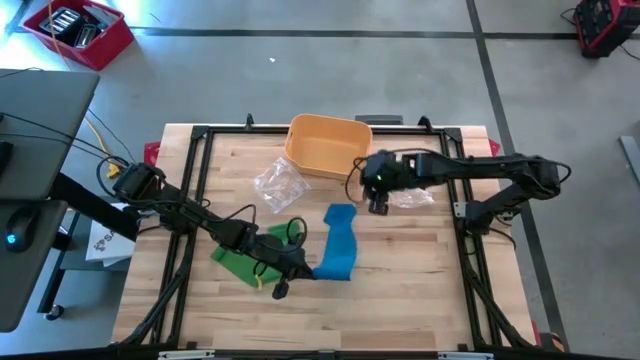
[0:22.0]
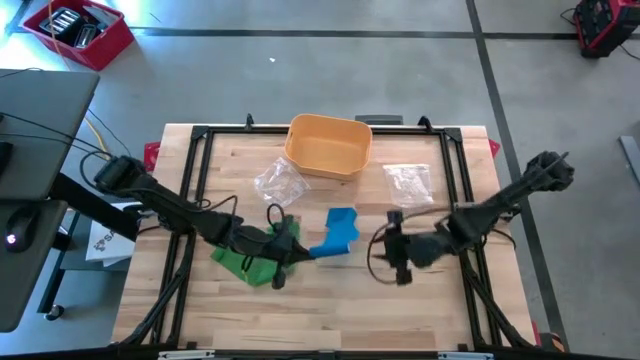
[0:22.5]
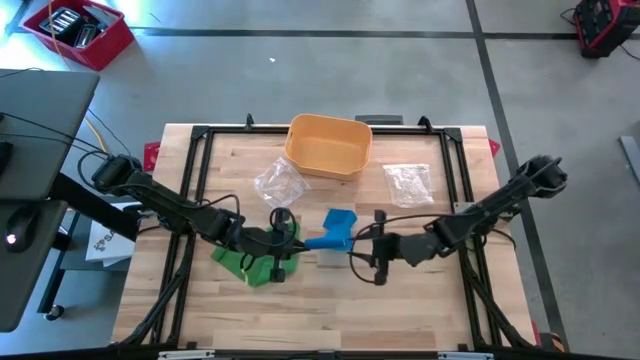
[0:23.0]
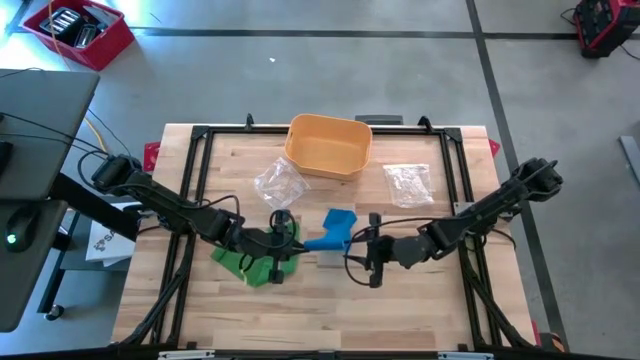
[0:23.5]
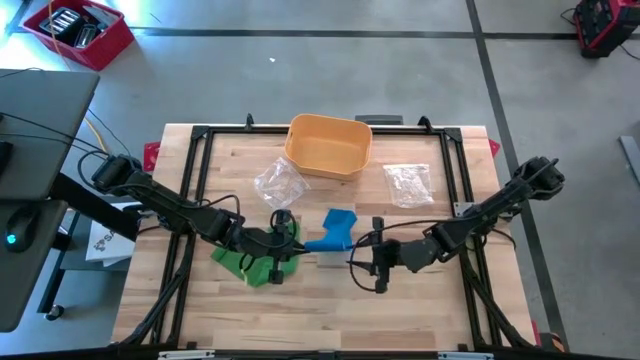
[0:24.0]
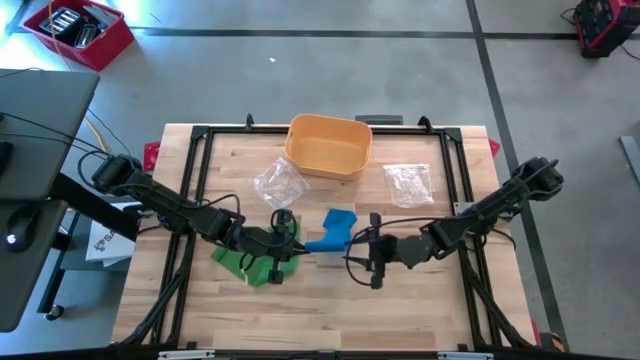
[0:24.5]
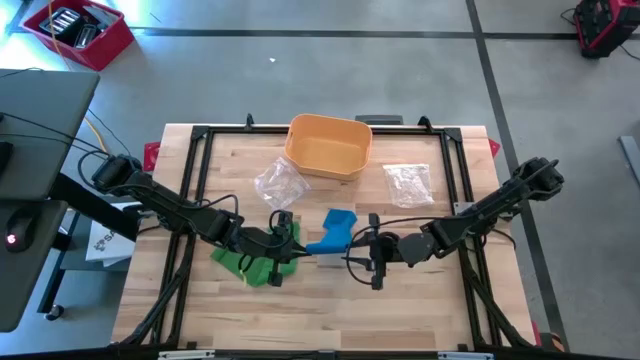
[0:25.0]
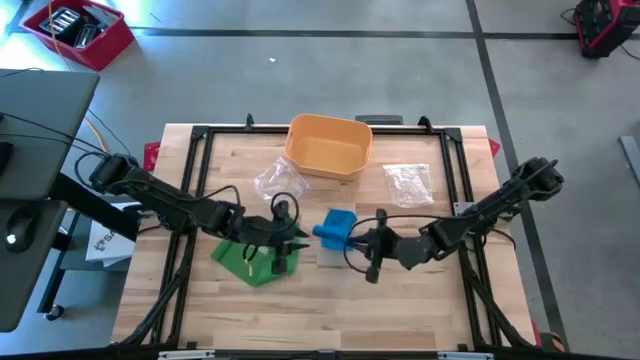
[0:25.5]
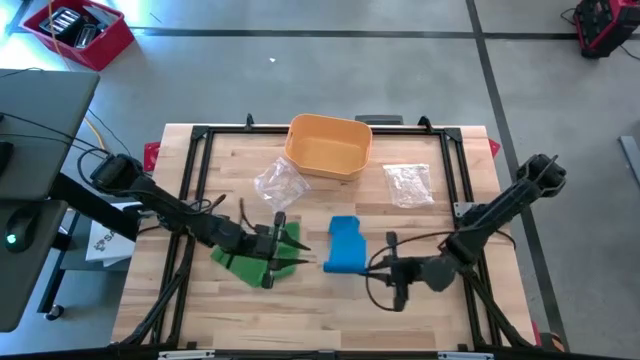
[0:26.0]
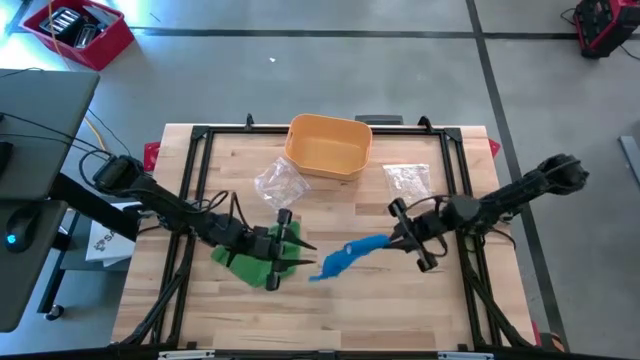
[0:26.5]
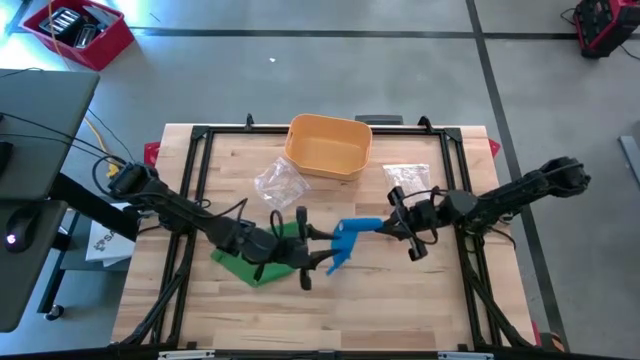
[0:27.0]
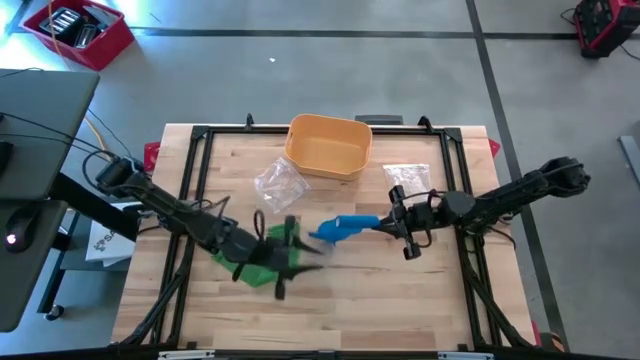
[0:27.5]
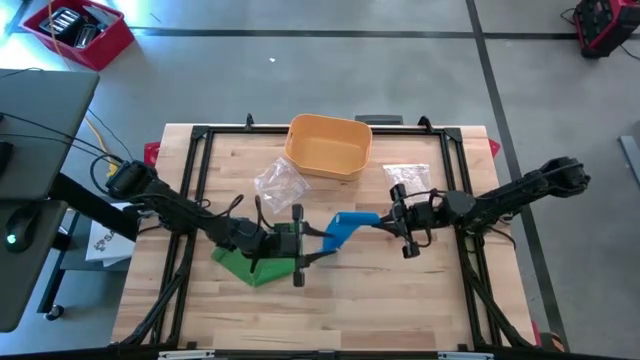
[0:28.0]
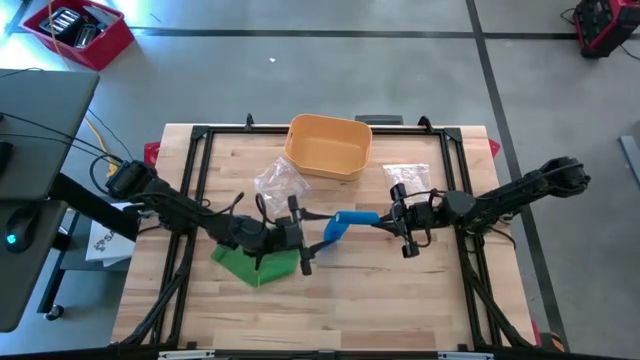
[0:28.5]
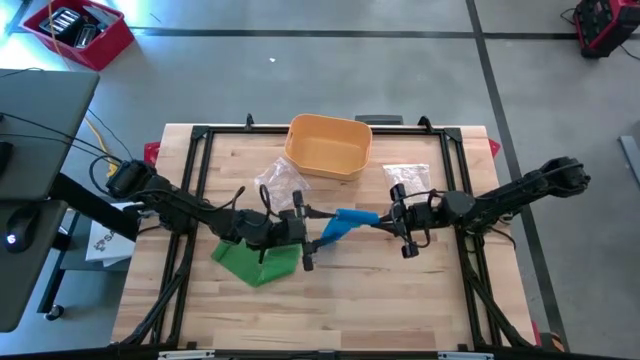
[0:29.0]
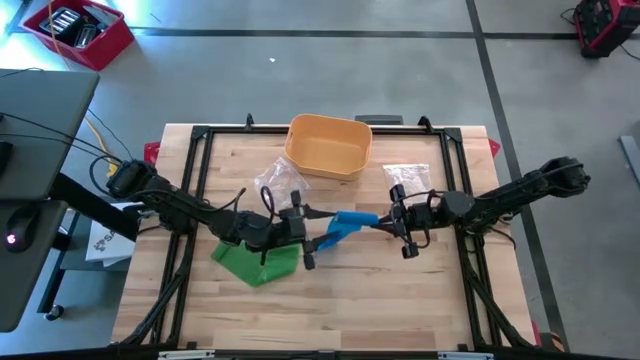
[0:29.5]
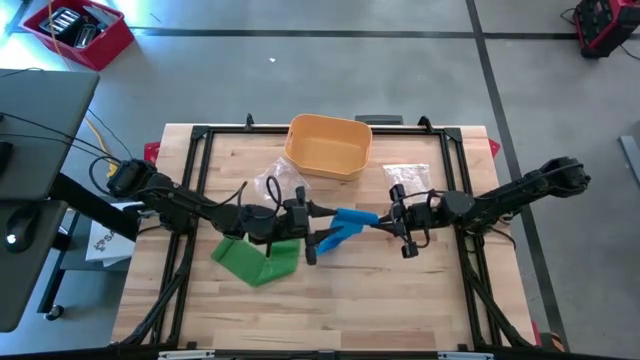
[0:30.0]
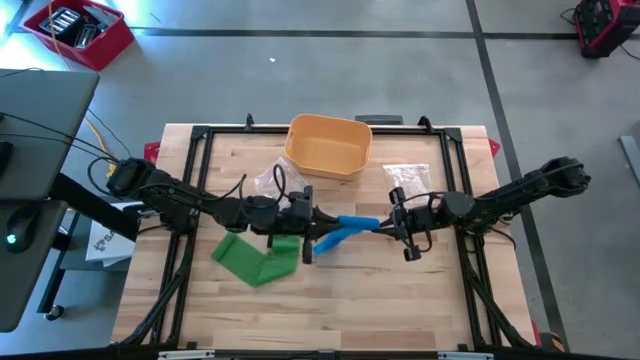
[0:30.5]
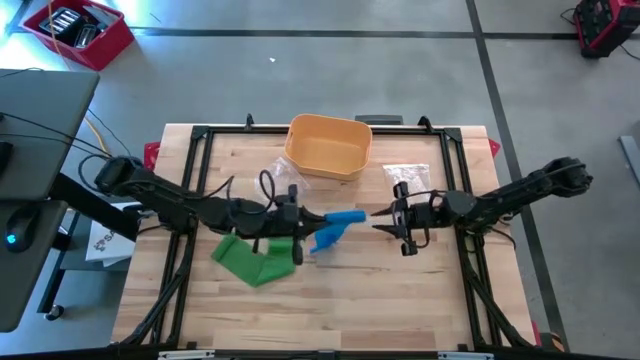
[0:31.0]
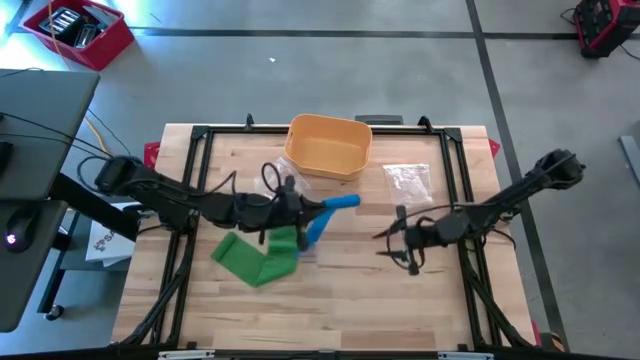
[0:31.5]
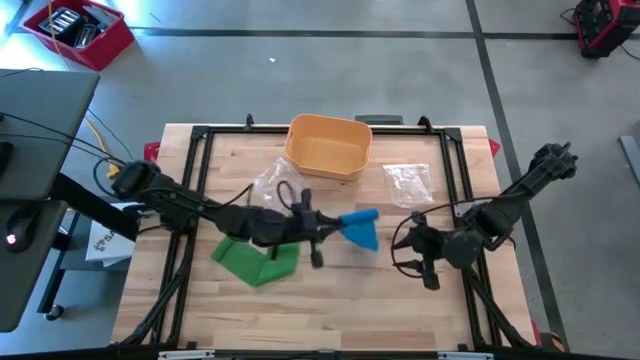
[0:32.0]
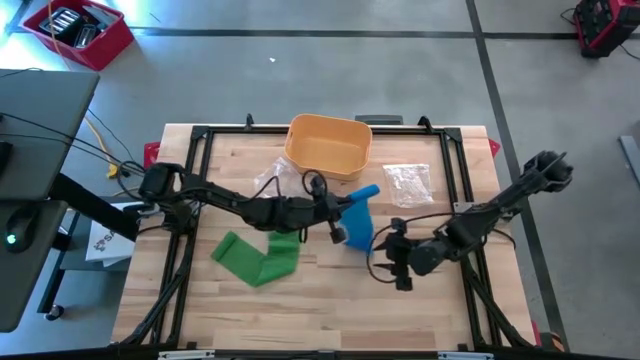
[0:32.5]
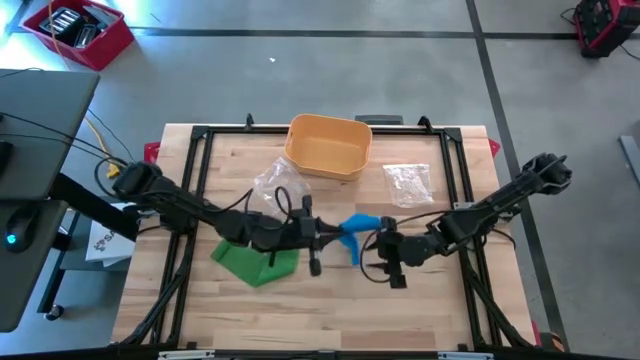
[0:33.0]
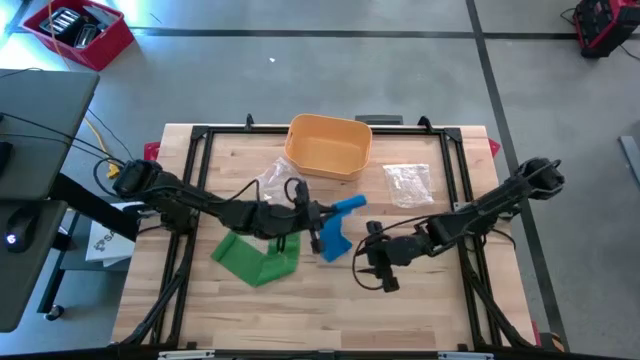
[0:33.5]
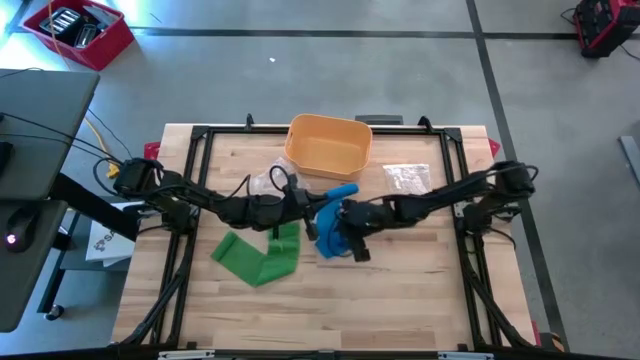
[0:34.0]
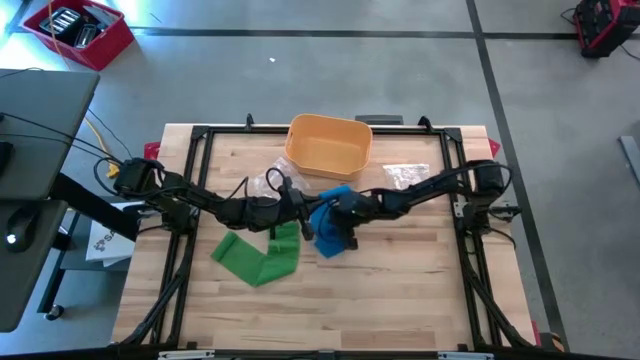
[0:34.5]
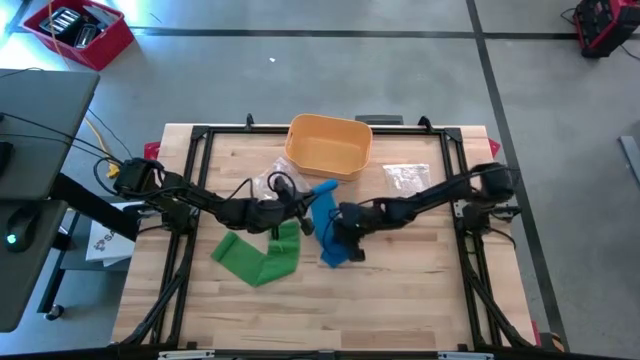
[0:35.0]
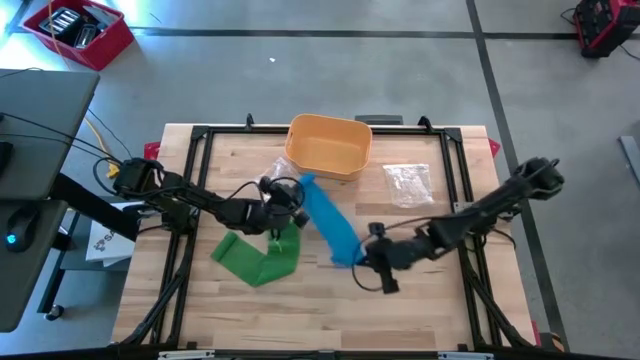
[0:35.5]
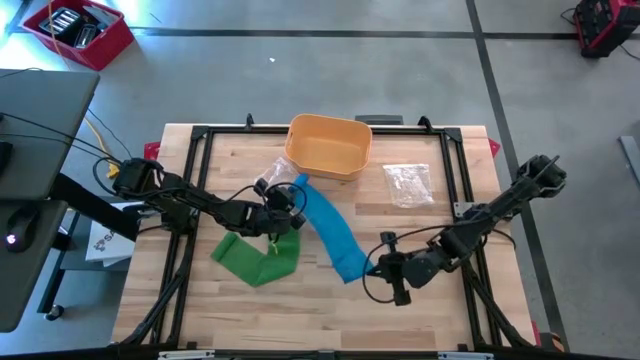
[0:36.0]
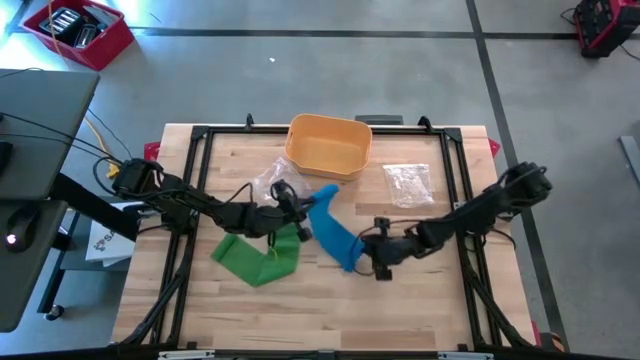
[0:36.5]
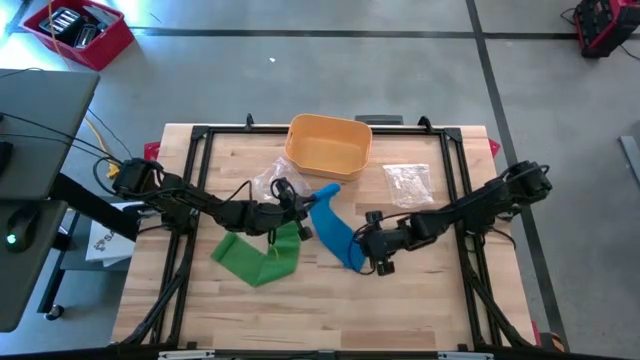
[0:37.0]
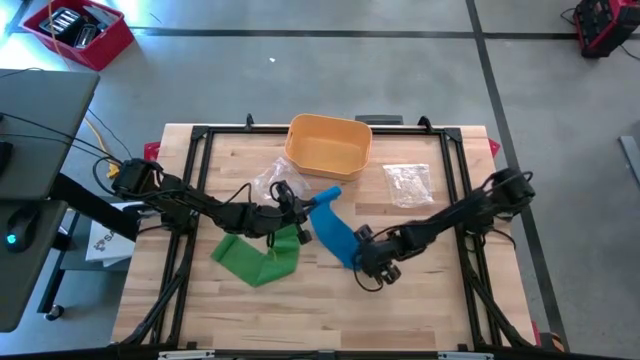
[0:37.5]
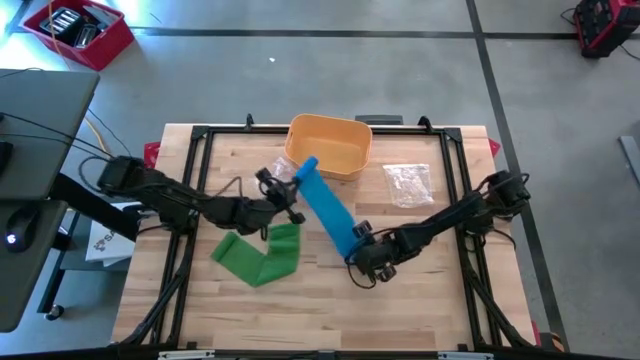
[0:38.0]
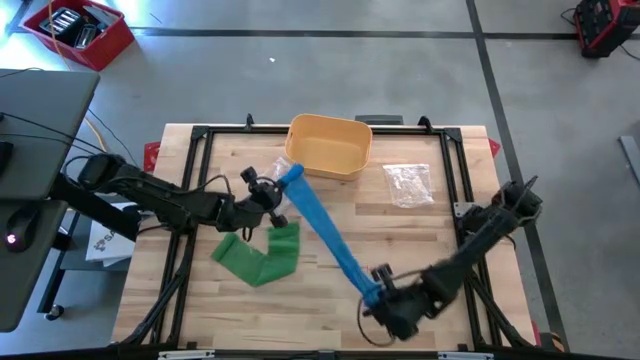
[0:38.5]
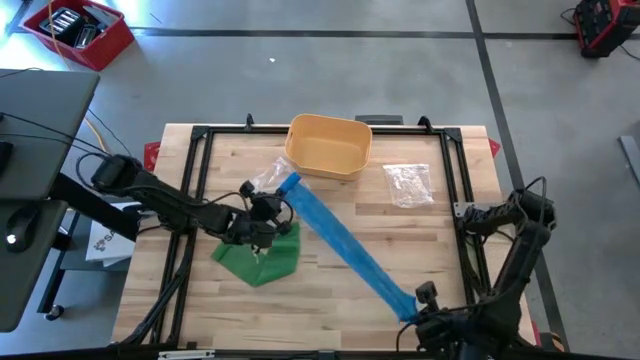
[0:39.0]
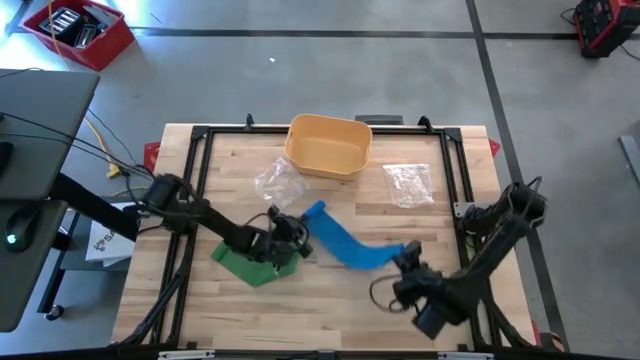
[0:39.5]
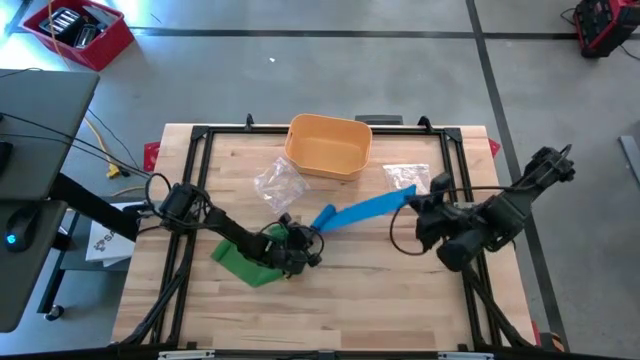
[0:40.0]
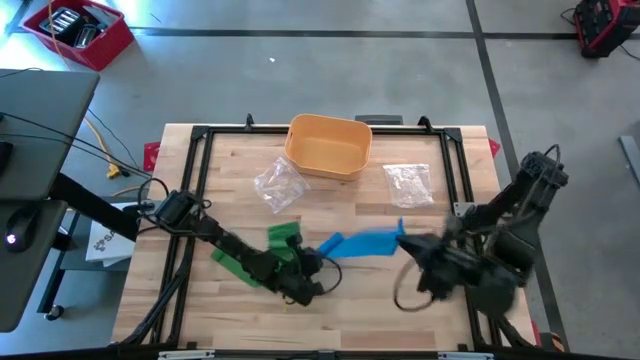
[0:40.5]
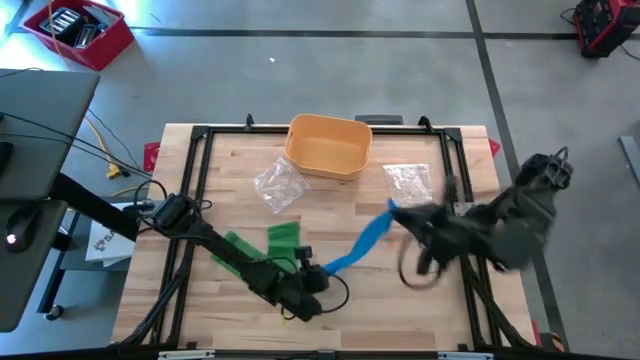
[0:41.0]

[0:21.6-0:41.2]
Task: Roll bandage
Roll the blue bandage

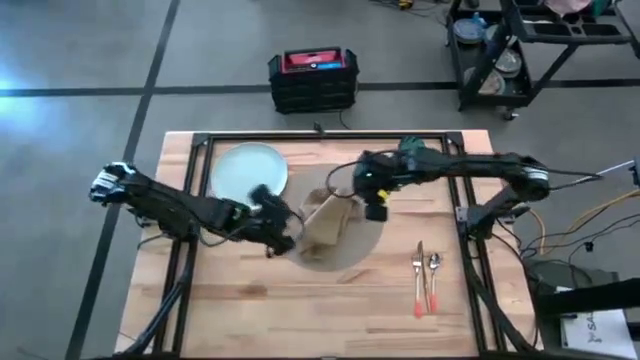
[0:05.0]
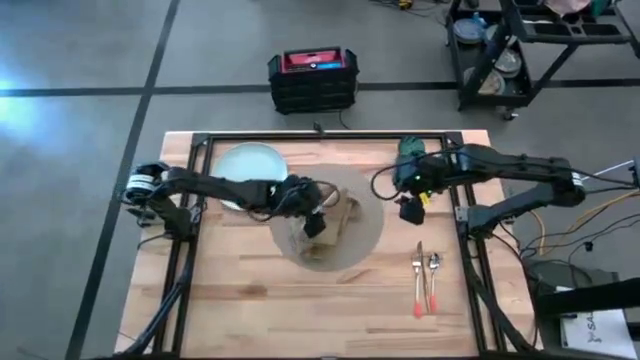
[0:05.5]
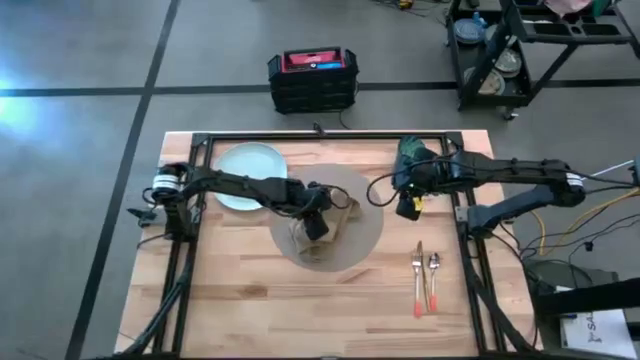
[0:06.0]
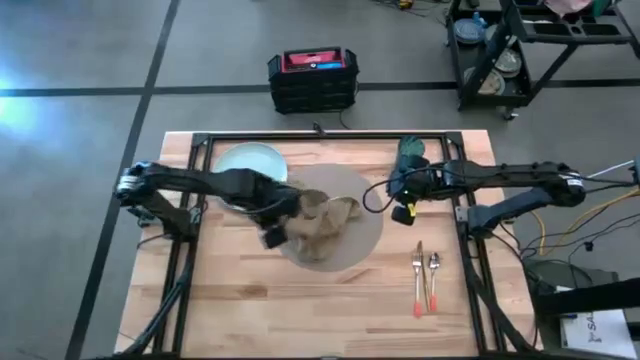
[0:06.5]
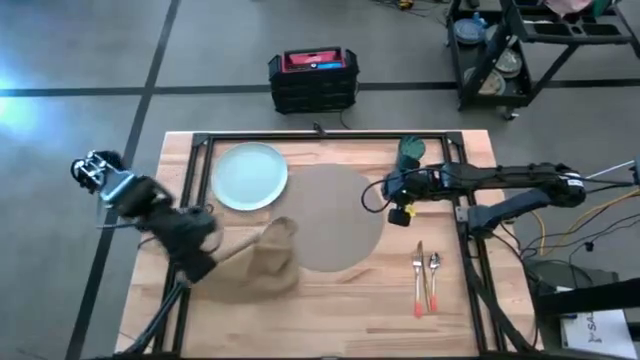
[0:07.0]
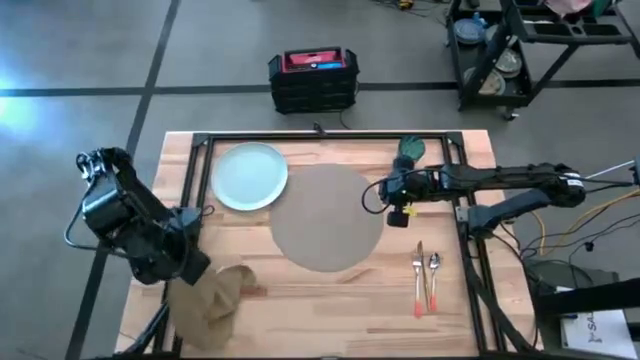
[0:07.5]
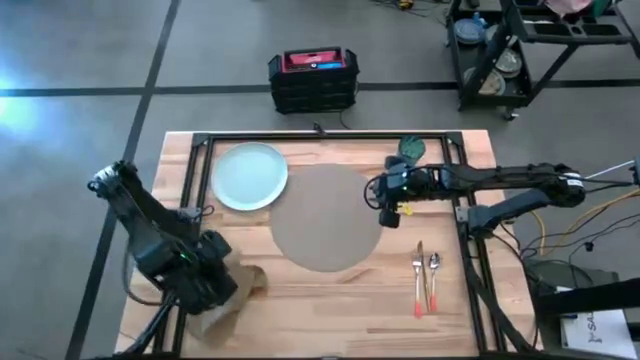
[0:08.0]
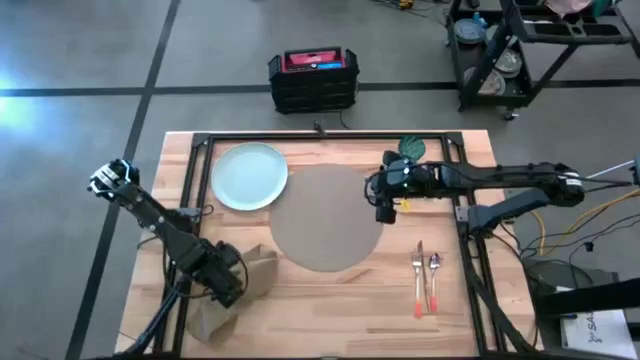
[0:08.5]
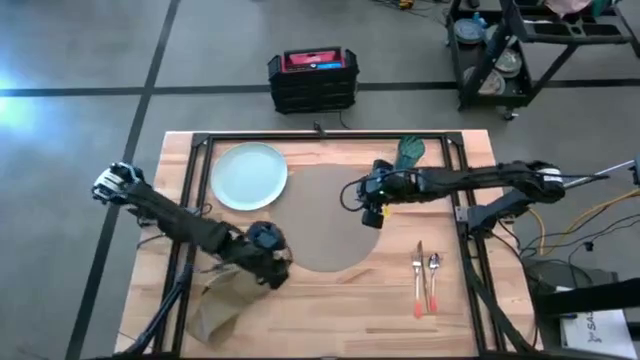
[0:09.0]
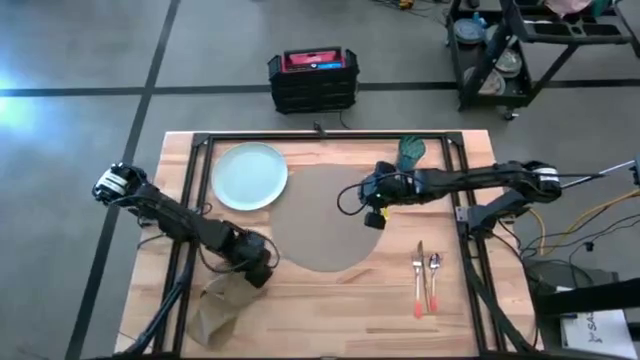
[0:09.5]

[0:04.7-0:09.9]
Task: Set table place
Remove the table napkin from the table mat
